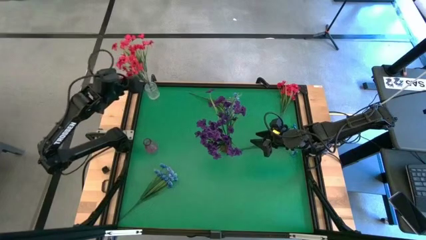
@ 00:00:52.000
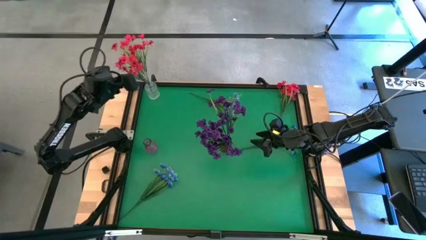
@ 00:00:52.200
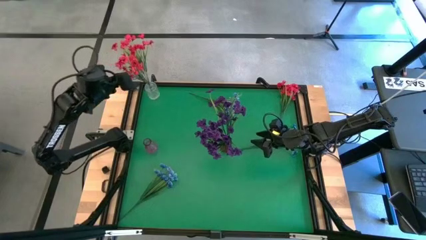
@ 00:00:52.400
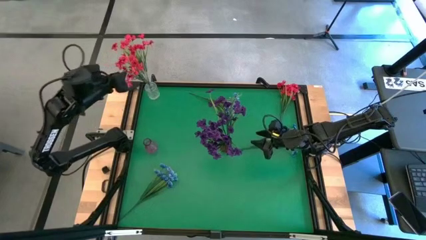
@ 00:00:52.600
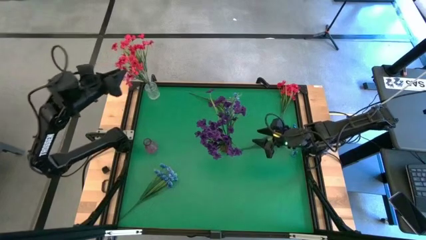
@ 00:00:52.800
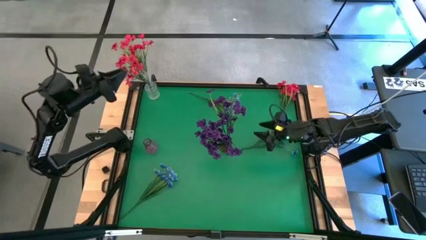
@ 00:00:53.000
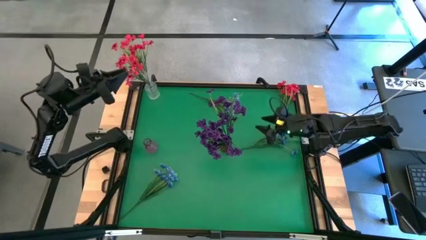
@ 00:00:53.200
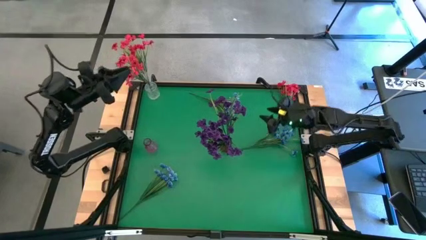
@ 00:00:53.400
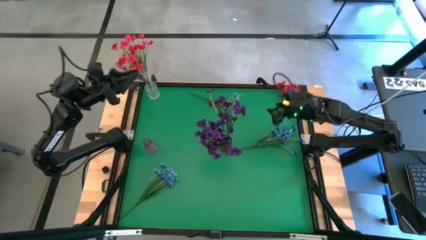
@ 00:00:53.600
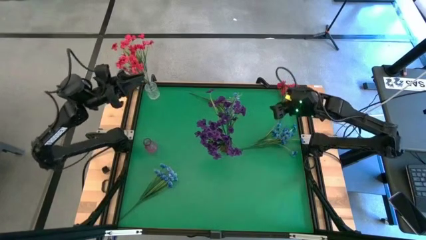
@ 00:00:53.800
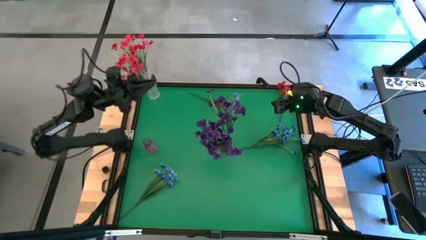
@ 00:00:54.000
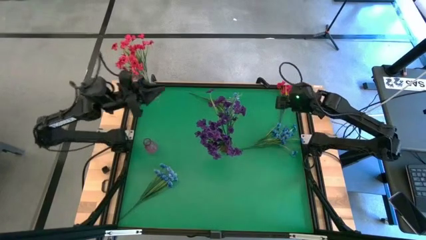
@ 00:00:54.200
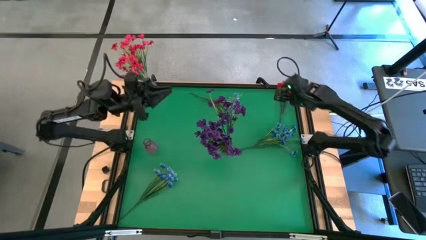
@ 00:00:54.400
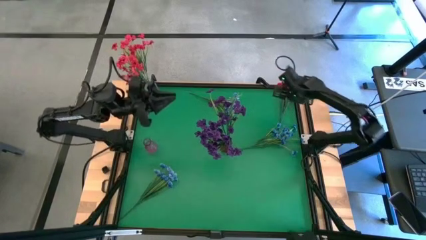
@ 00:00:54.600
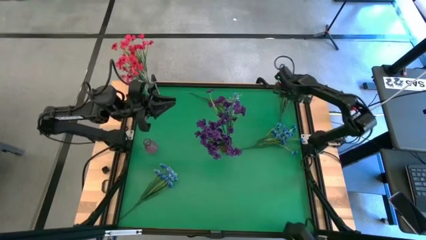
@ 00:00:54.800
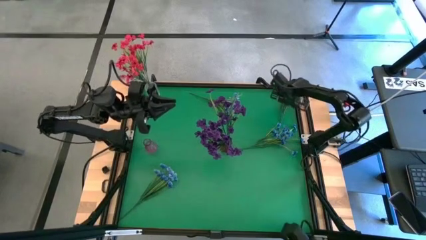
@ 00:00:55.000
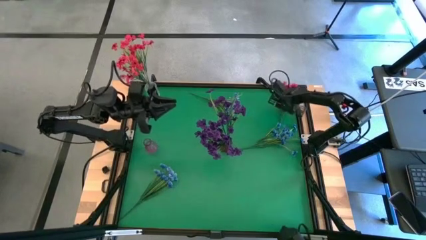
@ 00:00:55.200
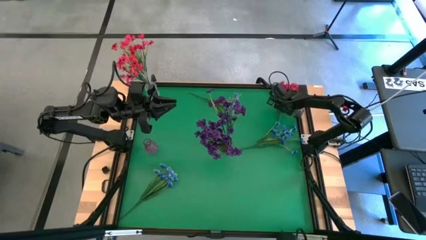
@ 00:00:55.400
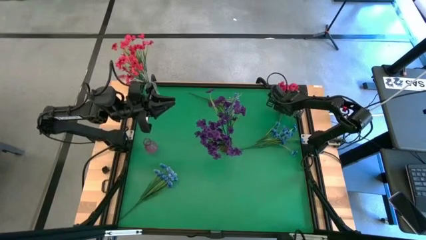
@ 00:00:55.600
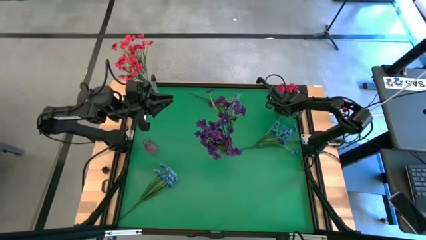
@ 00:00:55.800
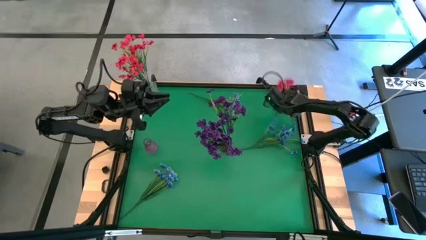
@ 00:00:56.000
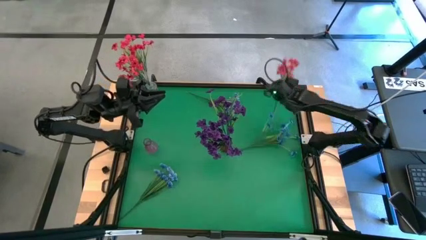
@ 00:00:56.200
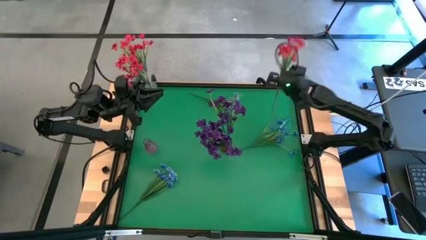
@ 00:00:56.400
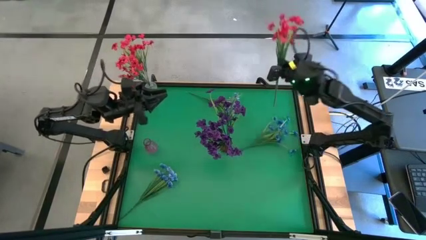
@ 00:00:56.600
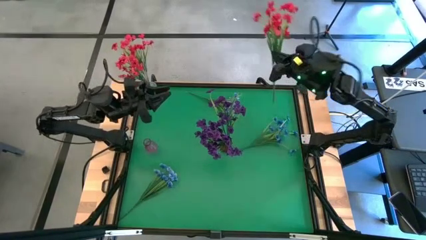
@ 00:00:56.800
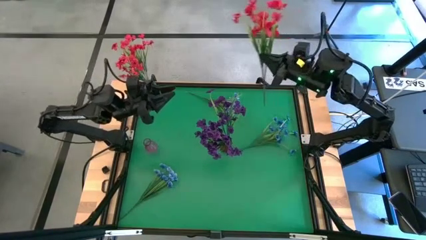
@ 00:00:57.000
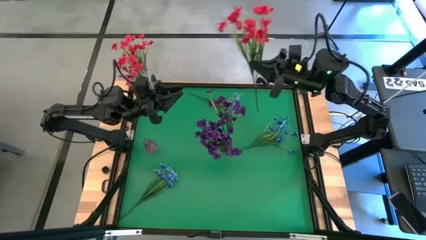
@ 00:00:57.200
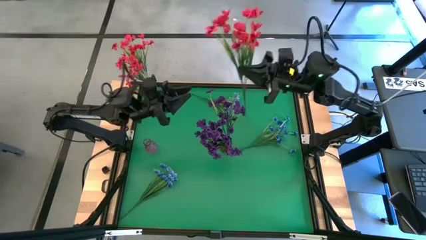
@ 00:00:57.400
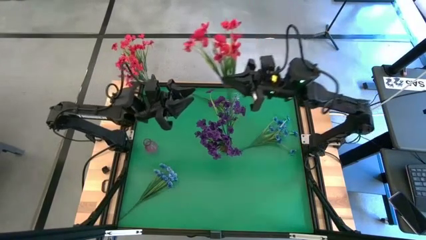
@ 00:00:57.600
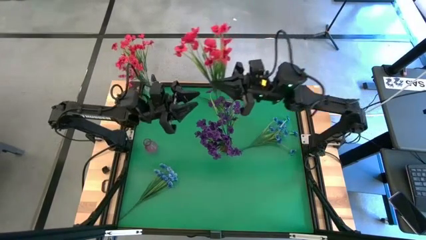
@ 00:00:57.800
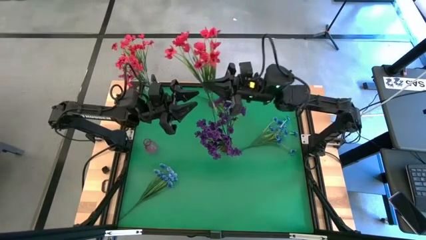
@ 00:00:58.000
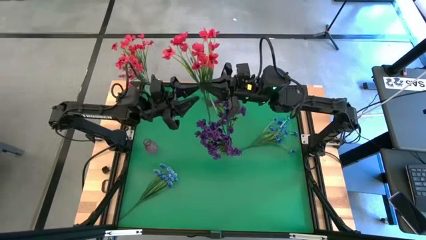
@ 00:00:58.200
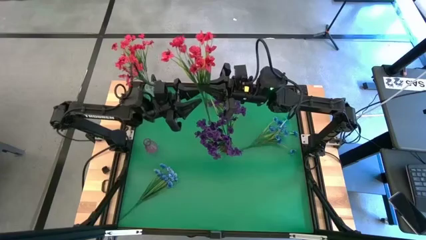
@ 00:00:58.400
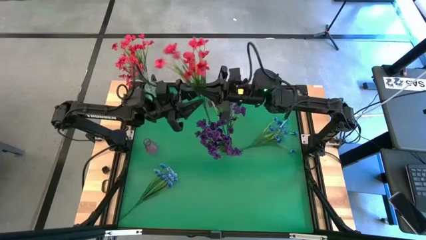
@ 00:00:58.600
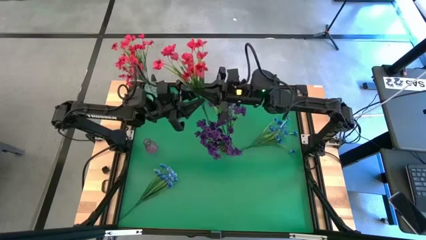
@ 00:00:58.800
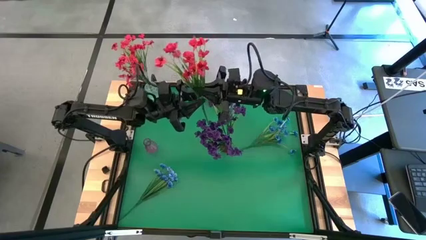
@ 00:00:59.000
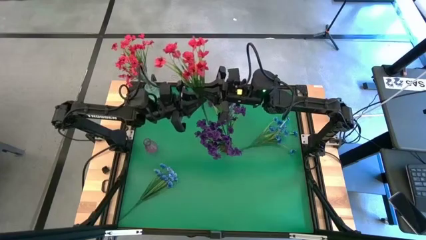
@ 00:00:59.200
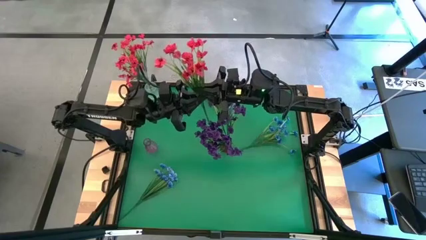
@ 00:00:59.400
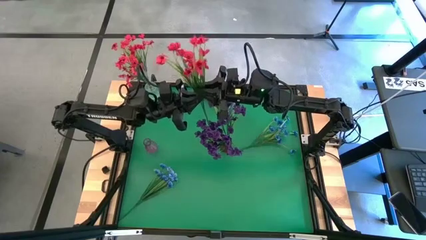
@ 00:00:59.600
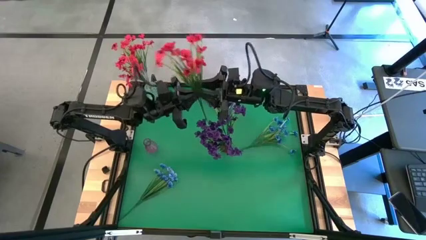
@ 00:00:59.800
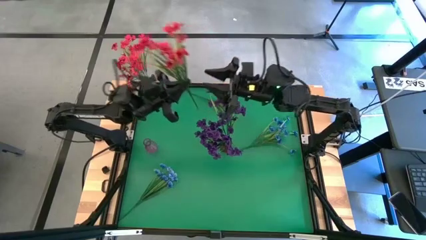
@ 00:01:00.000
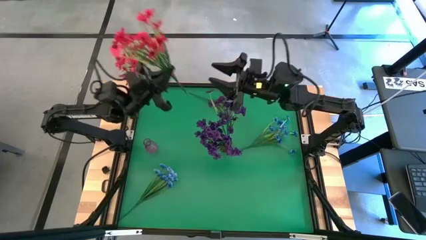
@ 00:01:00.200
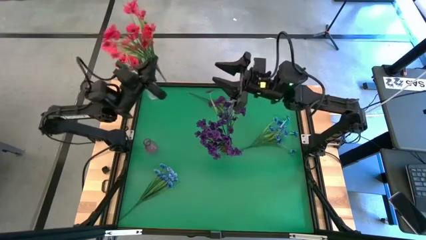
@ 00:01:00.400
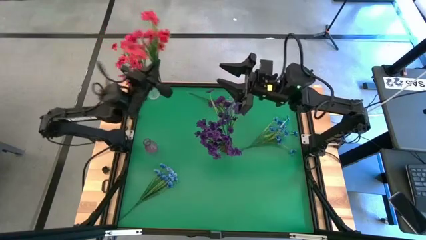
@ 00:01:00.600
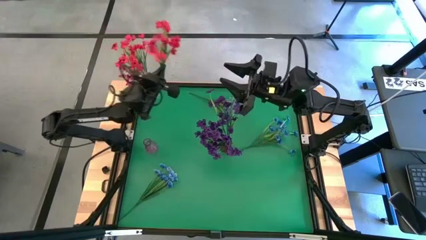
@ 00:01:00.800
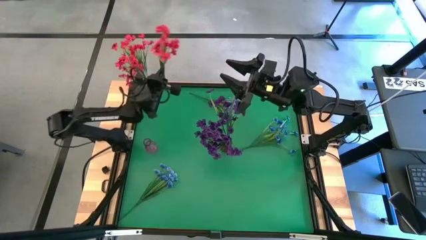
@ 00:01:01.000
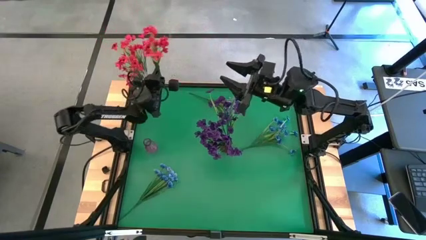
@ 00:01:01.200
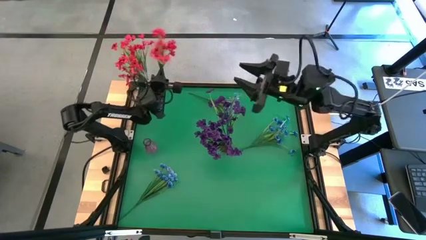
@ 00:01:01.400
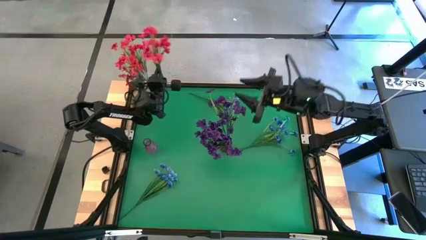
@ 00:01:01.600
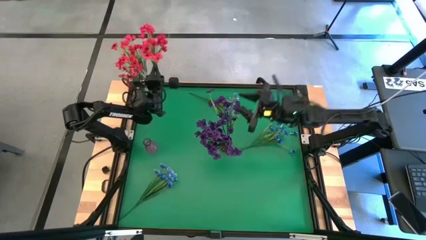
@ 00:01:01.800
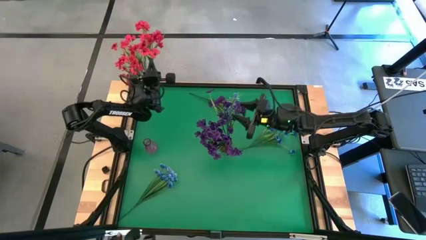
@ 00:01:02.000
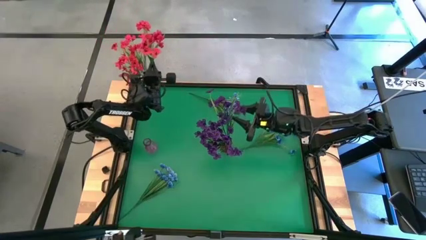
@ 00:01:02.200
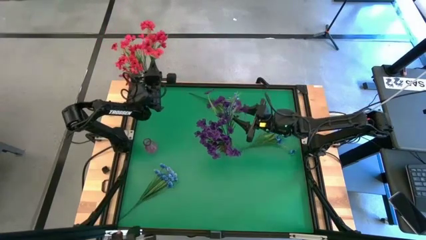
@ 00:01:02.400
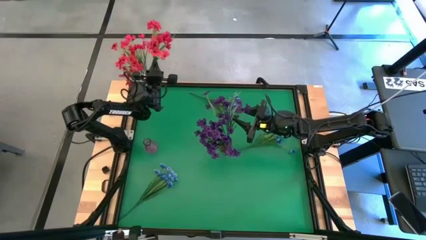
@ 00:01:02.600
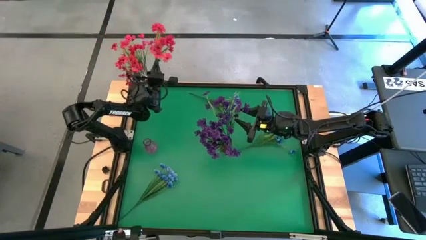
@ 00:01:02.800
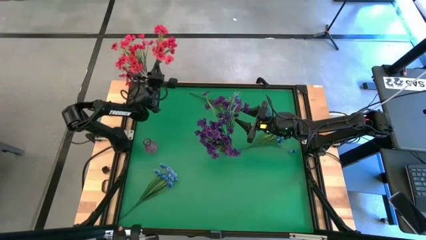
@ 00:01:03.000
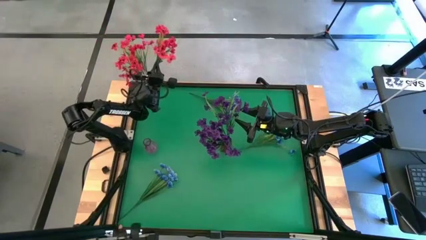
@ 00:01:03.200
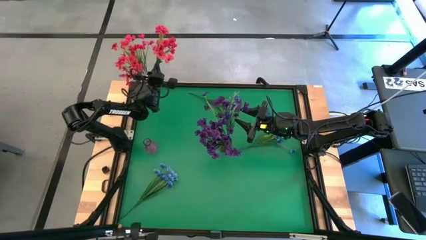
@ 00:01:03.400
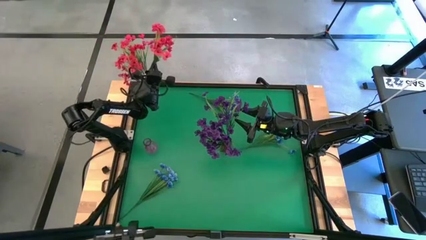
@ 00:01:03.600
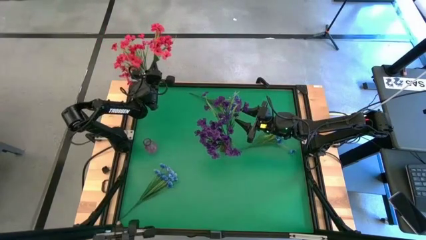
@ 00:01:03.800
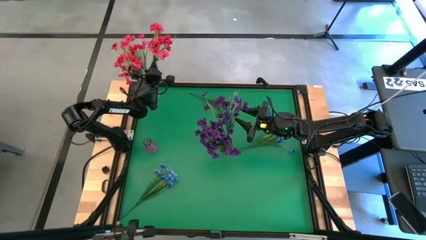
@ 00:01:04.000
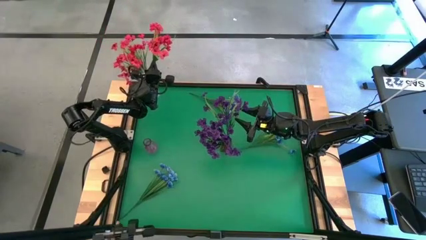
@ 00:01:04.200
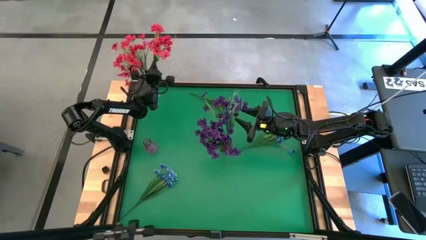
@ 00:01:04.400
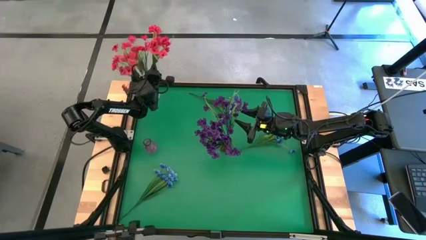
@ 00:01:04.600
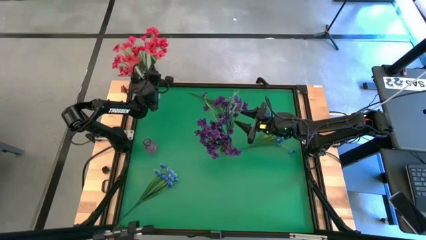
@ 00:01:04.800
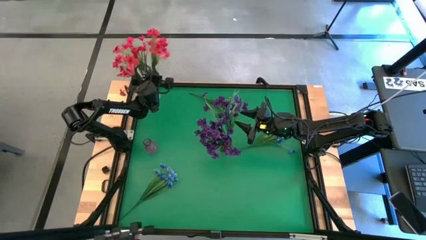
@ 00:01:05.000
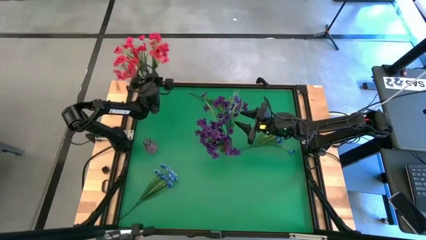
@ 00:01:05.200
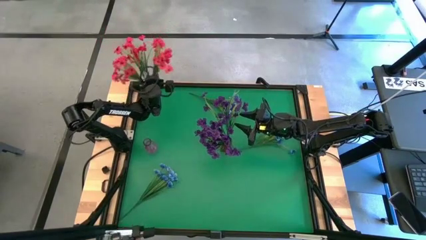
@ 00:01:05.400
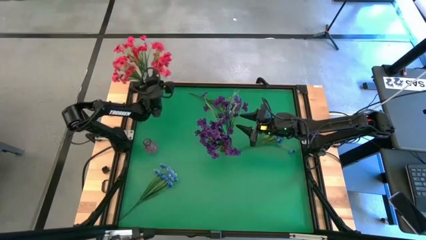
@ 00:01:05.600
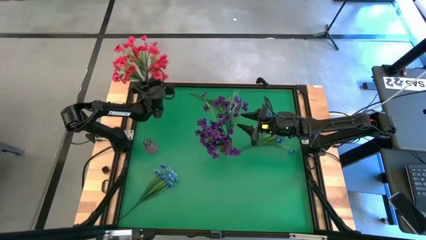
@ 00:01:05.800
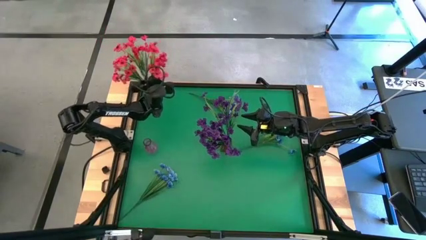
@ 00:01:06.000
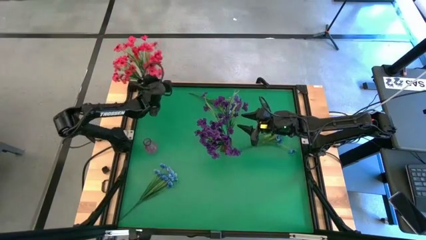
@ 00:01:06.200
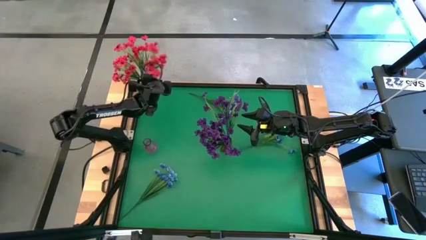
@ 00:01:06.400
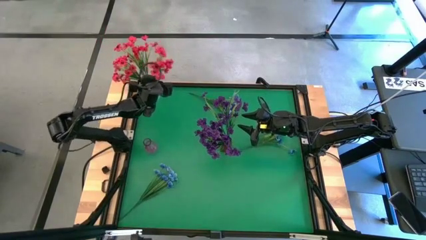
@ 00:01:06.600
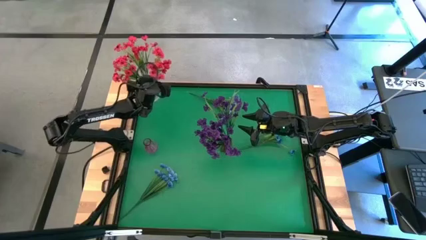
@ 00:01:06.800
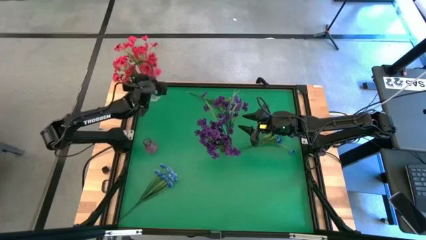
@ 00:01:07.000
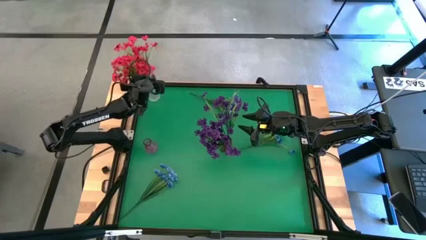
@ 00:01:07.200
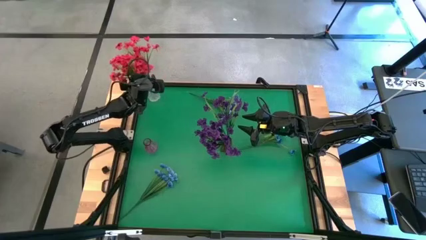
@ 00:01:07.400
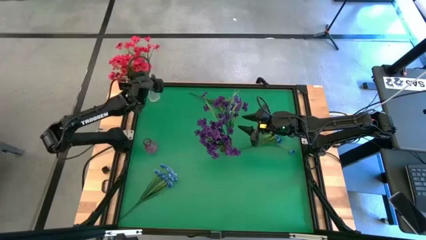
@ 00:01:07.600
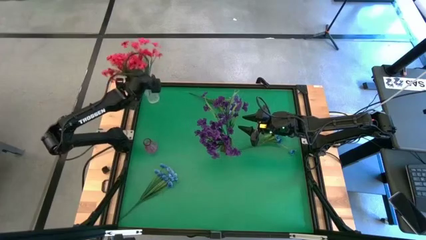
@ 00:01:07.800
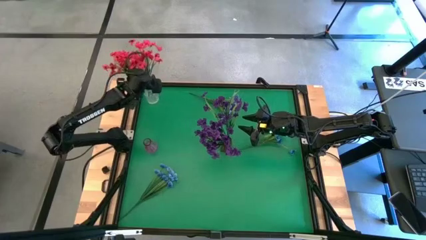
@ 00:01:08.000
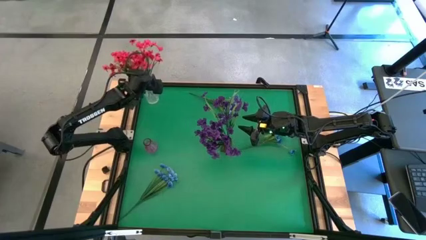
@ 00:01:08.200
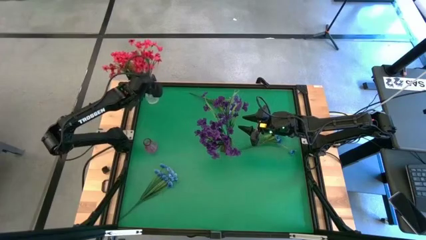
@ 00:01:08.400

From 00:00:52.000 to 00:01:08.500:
Task: Sort flowers into vase by color
Put the red flowers into the transparent vase
